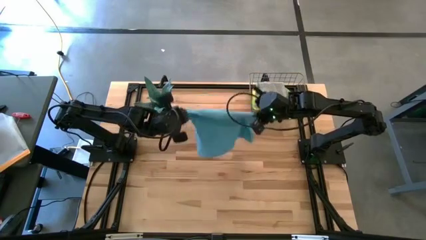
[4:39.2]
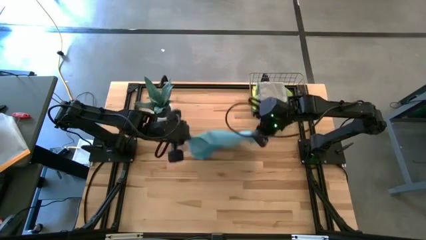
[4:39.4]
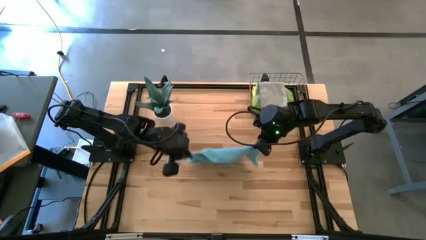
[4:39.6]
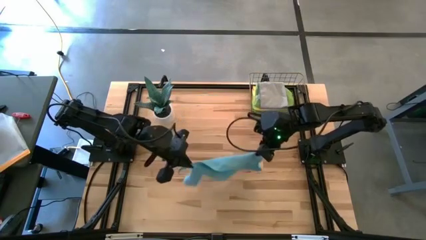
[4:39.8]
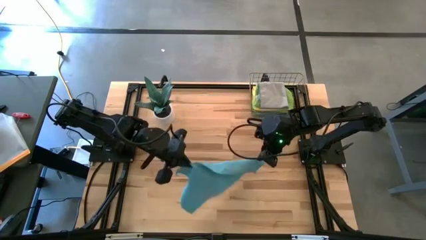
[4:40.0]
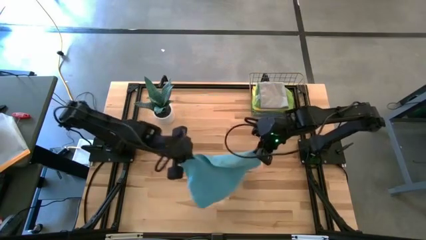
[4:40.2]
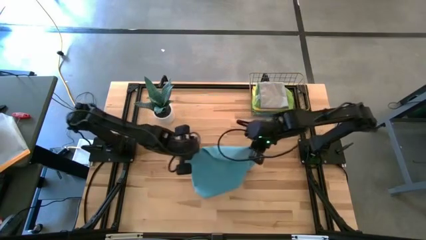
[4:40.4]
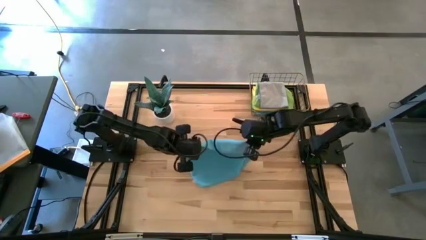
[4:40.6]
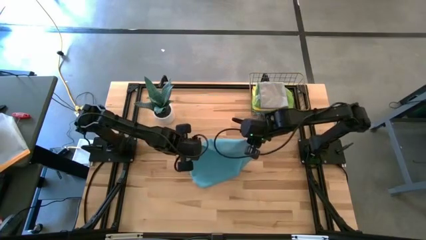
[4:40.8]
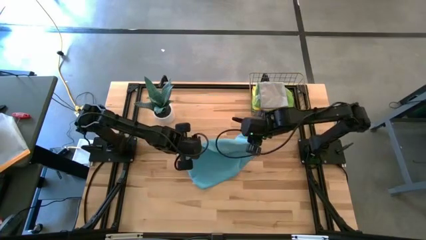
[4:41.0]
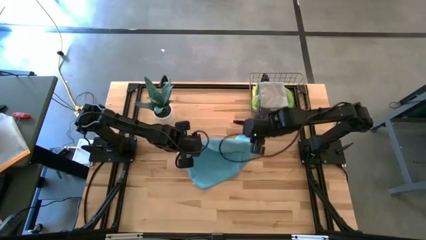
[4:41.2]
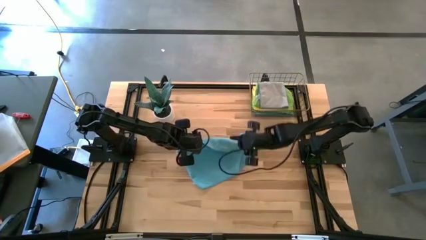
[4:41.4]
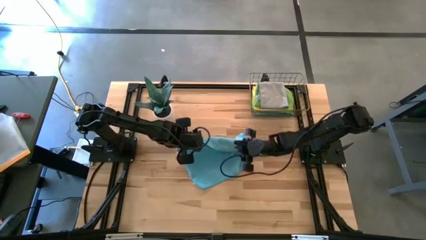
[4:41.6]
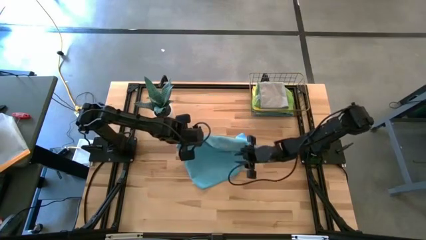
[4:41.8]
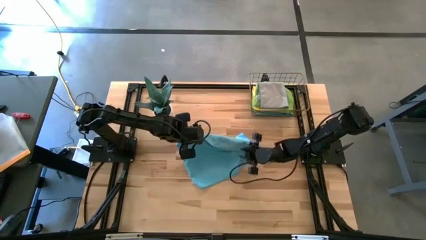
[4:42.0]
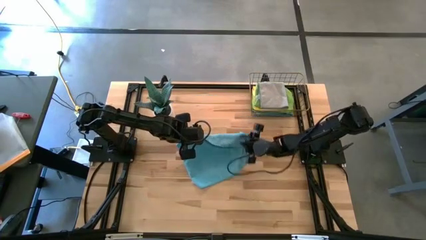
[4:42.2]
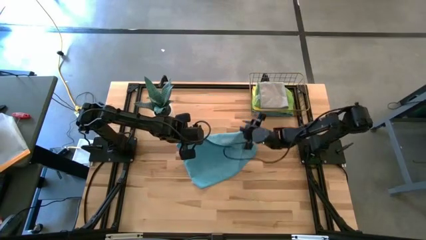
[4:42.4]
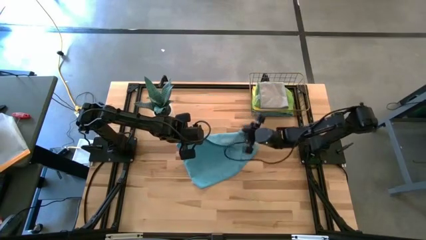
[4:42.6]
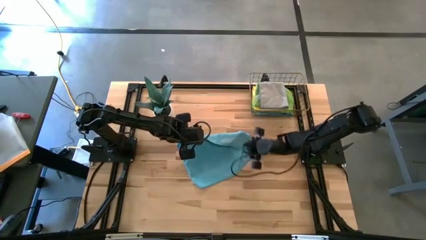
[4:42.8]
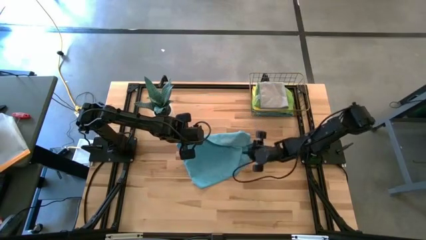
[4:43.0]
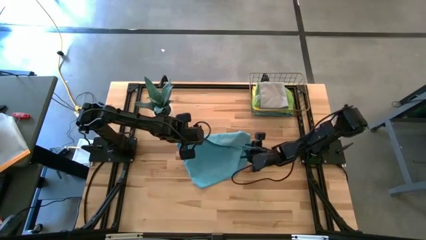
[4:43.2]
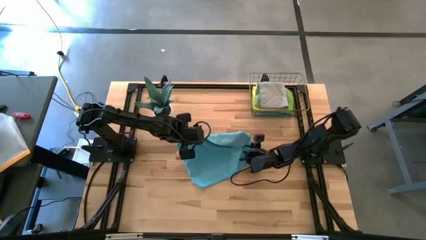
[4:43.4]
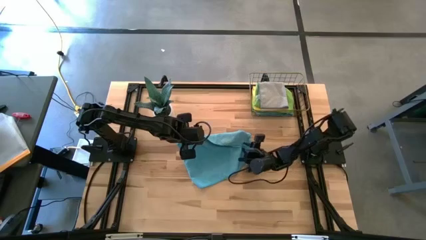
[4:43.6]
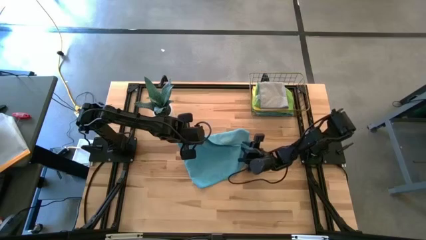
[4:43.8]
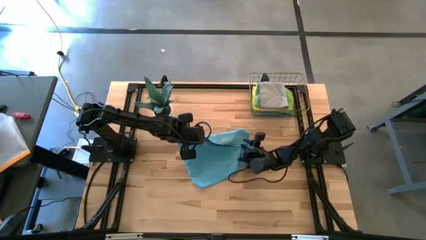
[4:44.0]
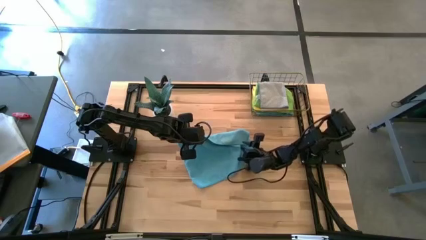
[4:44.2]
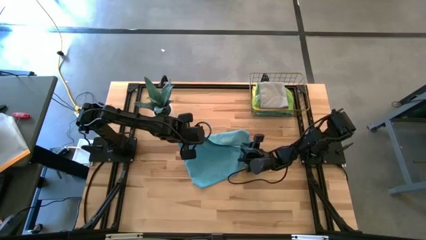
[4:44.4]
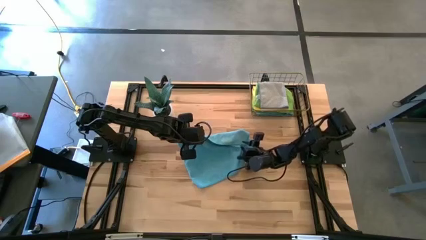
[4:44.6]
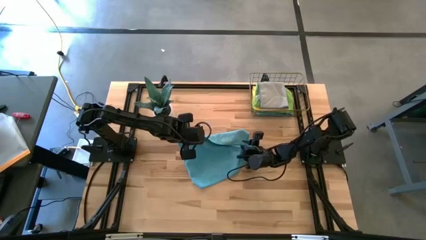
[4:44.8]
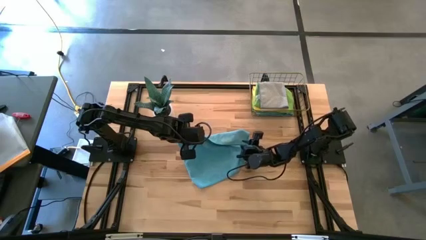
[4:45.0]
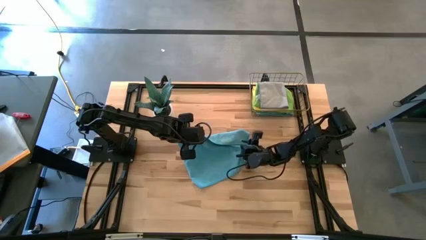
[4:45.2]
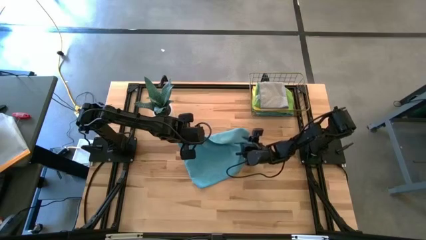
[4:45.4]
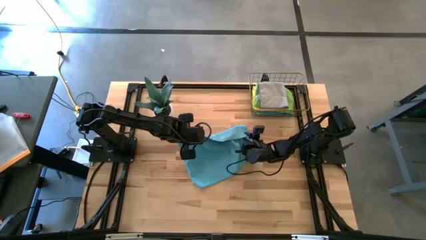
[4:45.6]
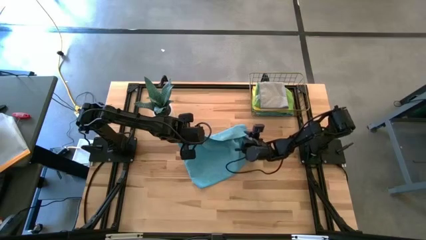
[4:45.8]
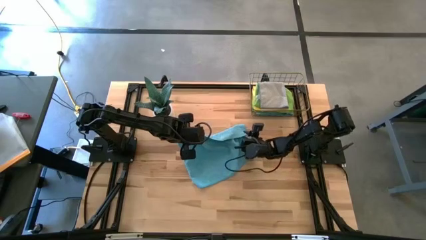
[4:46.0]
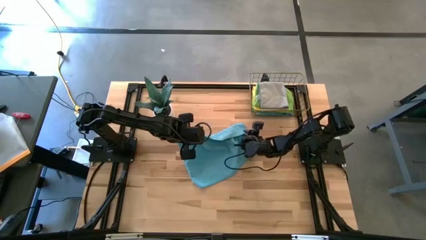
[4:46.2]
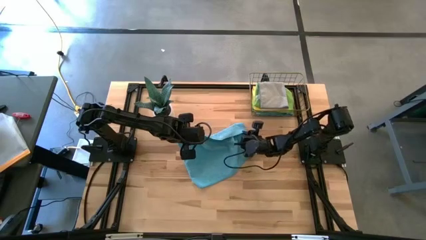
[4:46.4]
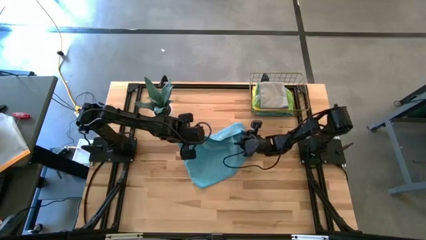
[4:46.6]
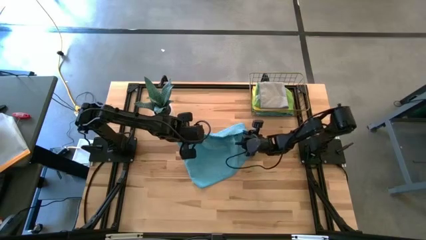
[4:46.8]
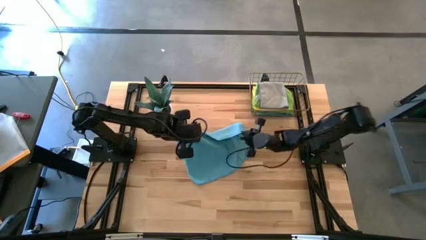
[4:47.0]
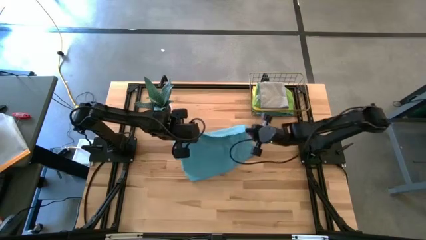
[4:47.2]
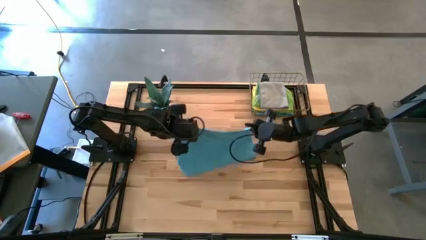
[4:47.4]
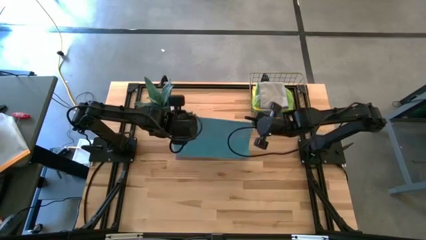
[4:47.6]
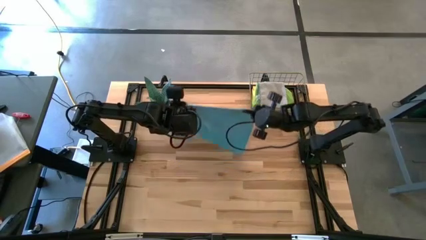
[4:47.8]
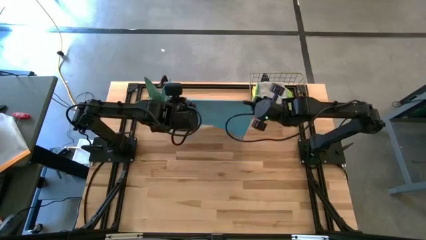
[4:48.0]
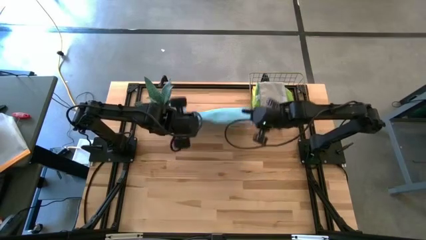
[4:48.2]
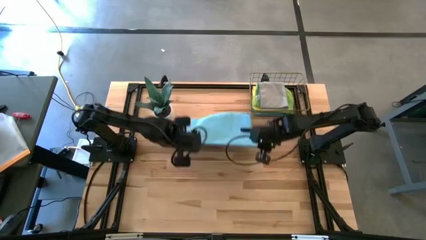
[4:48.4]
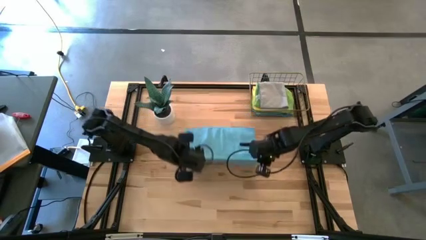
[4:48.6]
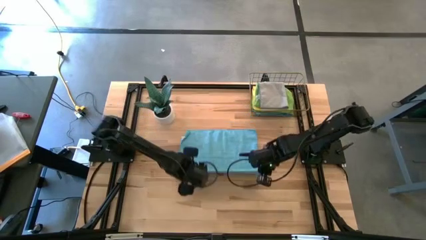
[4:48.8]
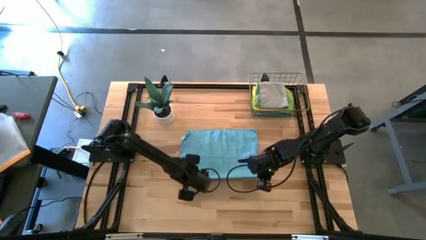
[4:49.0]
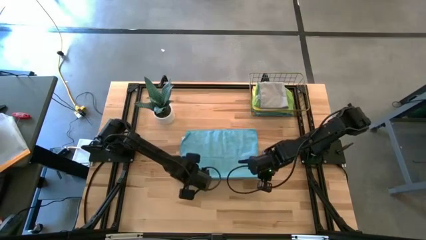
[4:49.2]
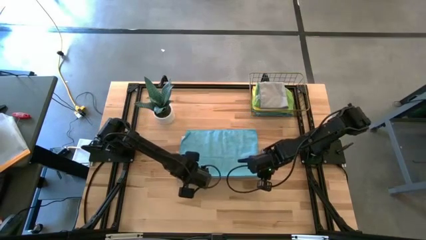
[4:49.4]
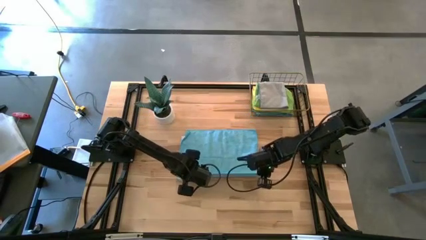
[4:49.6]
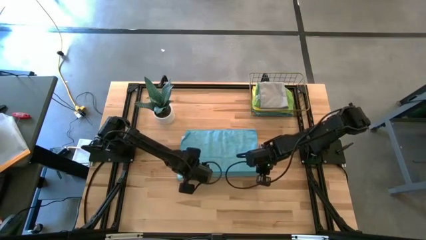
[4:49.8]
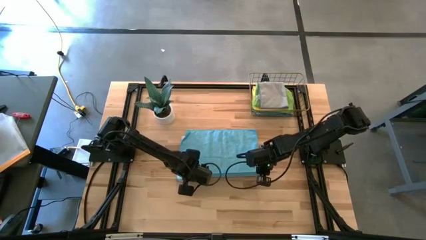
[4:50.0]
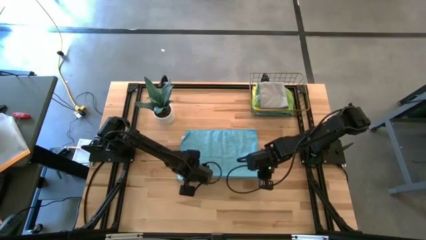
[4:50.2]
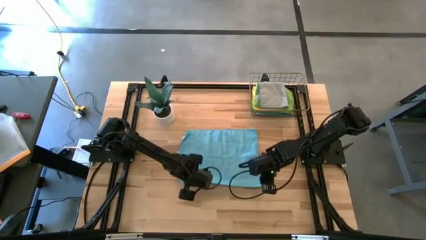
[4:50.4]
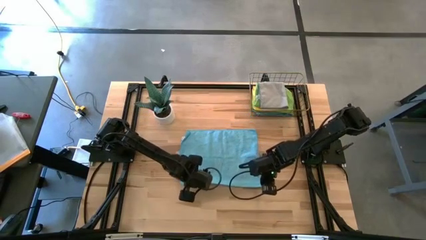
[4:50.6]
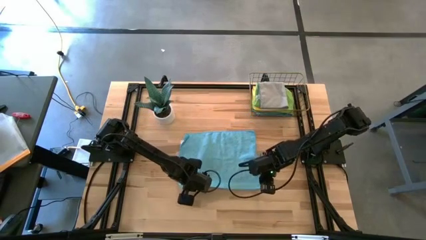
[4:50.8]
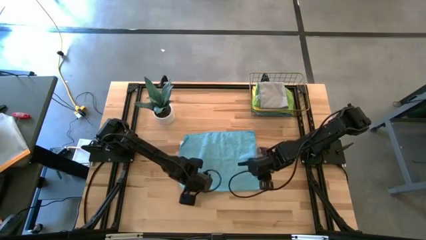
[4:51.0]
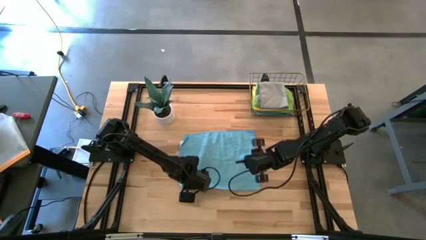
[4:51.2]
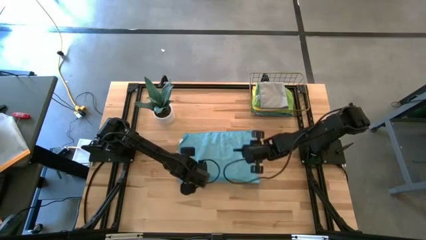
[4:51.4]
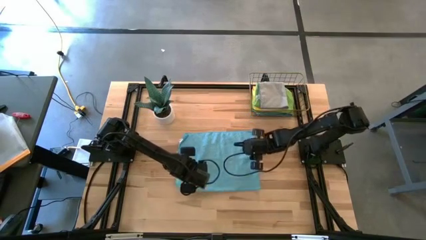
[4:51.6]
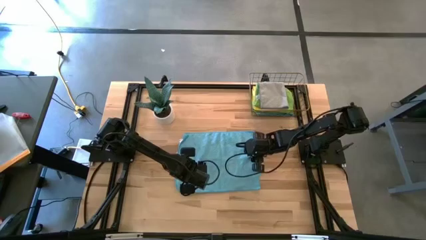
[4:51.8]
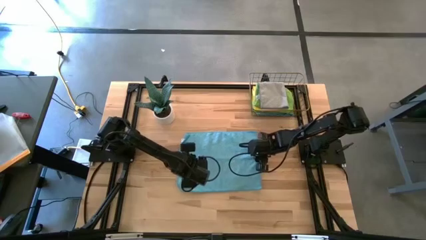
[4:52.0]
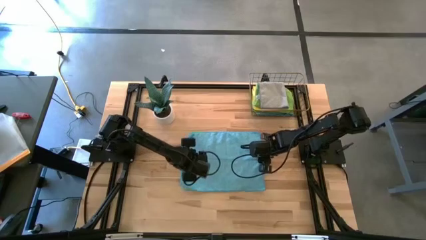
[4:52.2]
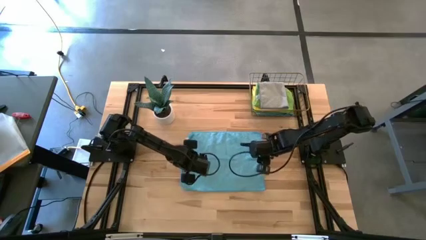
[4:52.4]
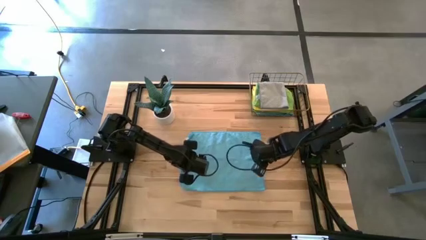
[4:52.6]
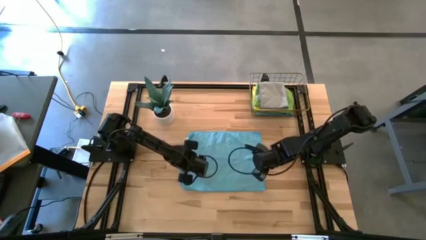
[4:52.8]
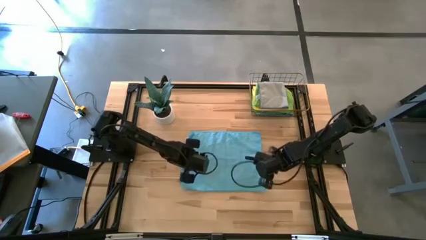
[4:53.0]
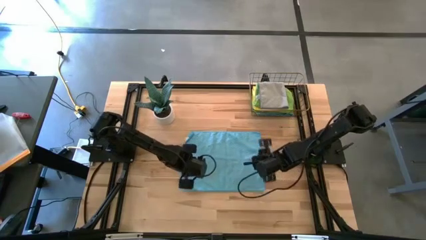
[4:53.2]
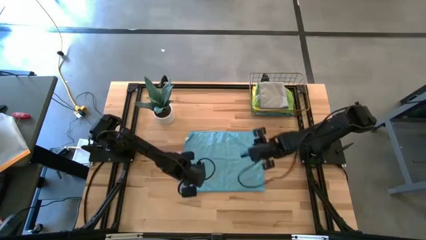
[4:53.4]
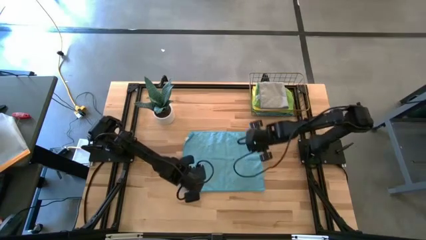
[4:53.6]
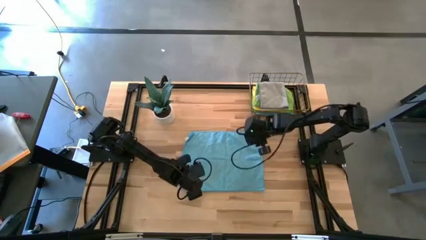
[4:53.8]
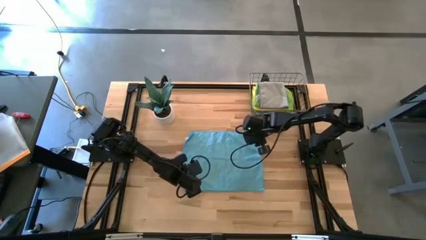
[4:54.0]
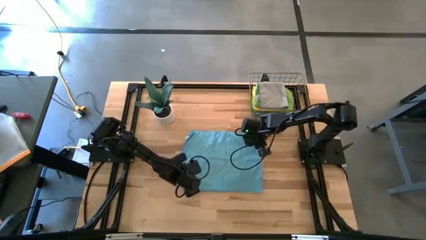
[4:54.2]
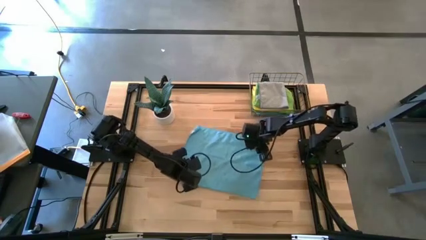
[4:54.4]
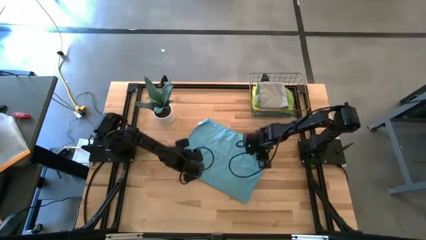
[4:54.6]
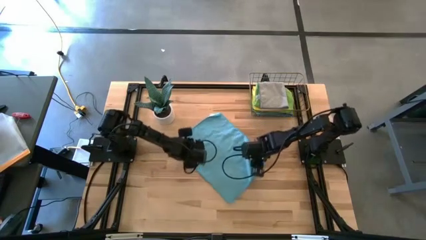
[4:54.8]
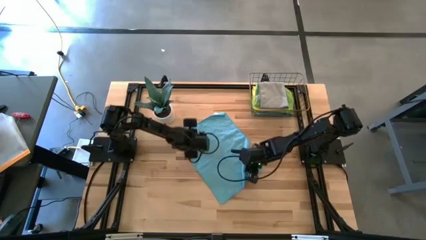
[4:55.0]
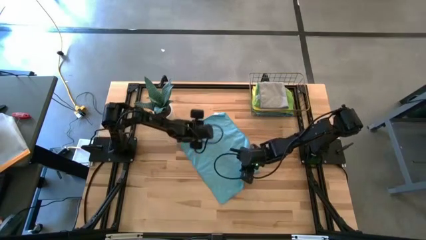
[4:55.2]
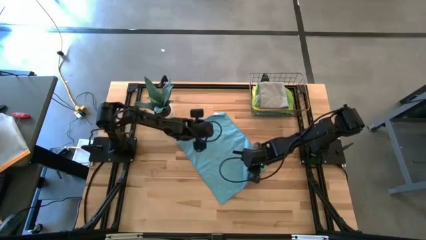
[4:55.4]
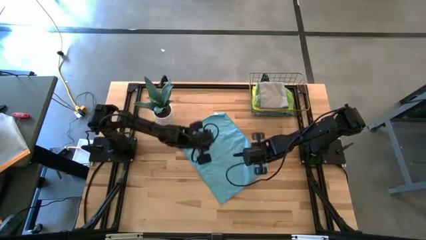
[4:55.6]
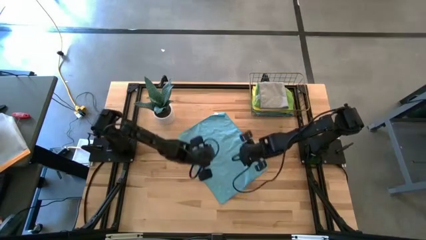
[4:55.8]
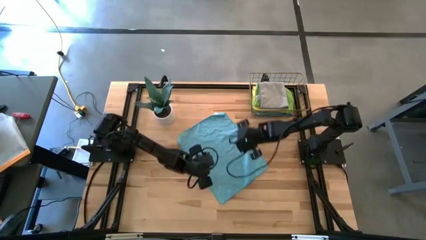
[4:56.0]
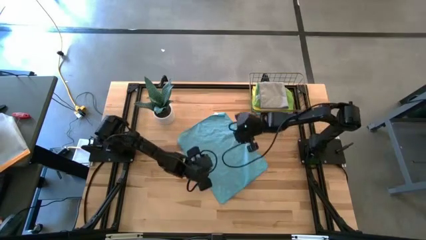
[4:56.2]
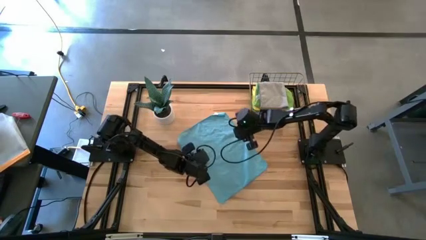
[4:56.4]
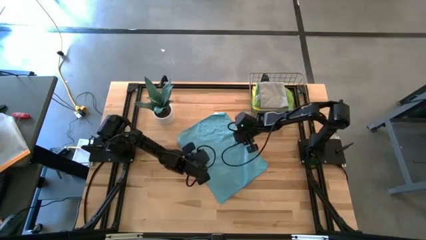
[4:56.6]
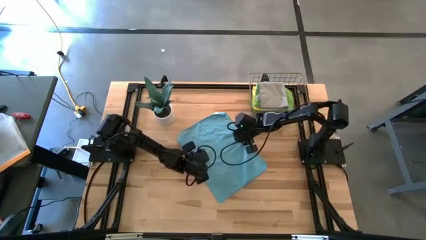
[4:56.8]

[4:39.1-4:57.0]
Task: Fold microfiber towels
Fold the blue towel
